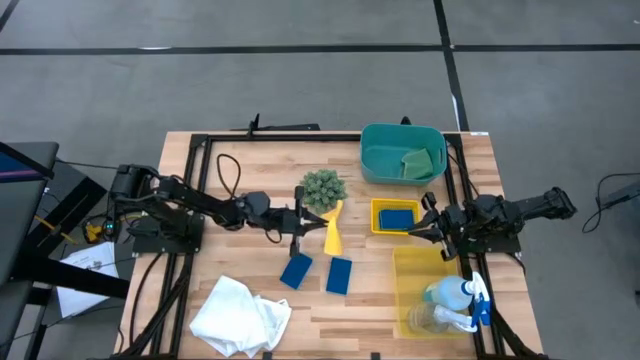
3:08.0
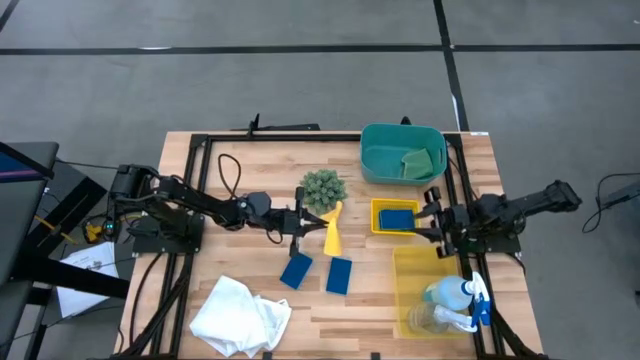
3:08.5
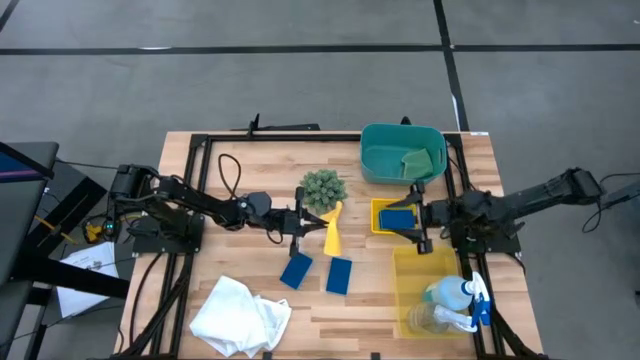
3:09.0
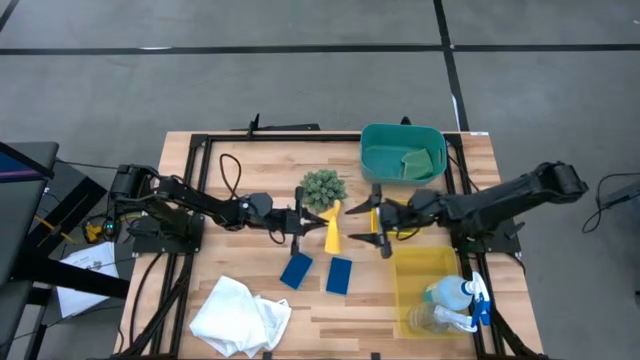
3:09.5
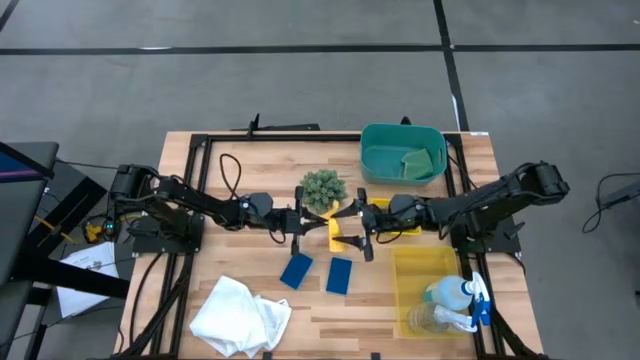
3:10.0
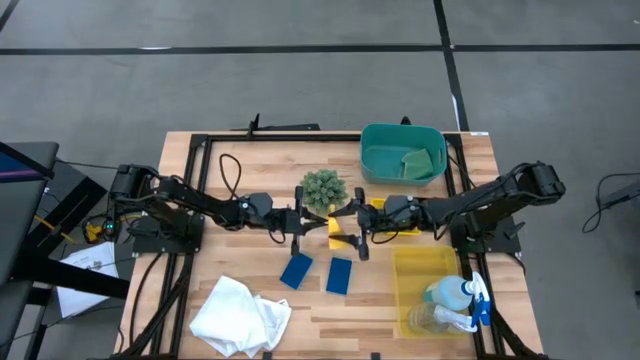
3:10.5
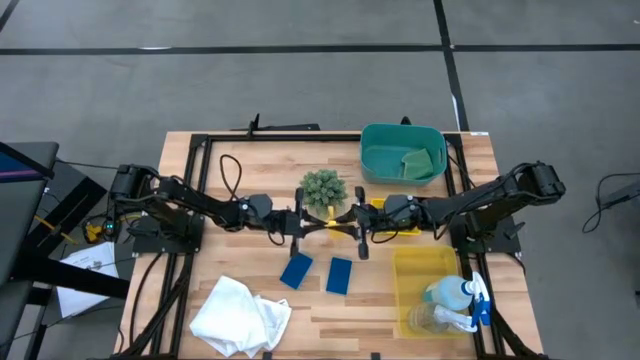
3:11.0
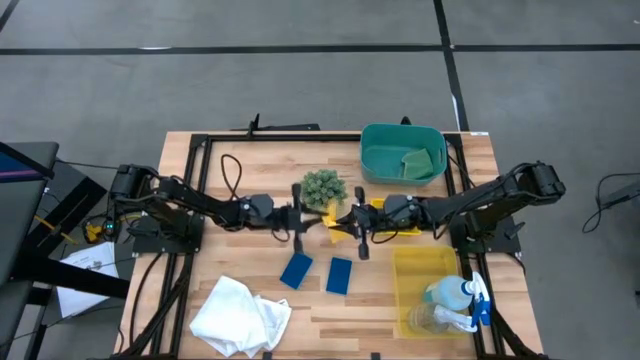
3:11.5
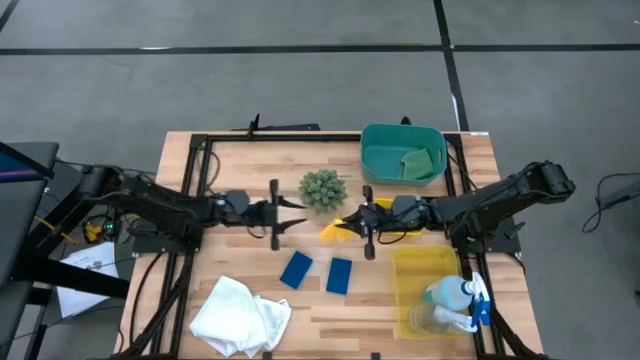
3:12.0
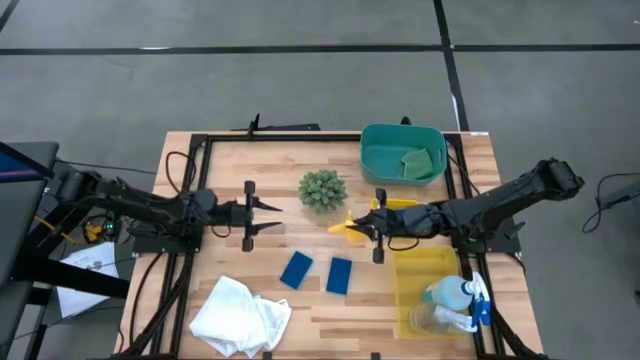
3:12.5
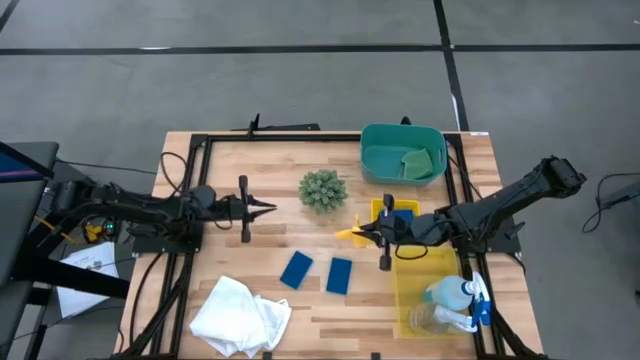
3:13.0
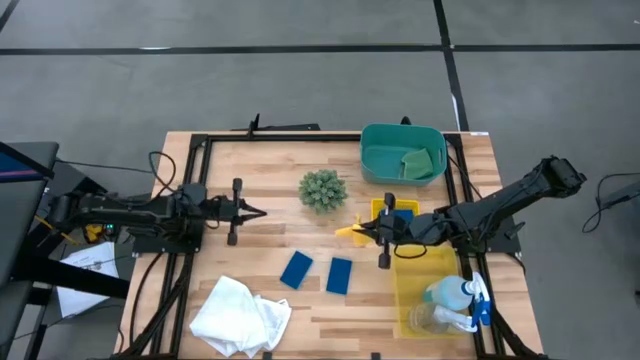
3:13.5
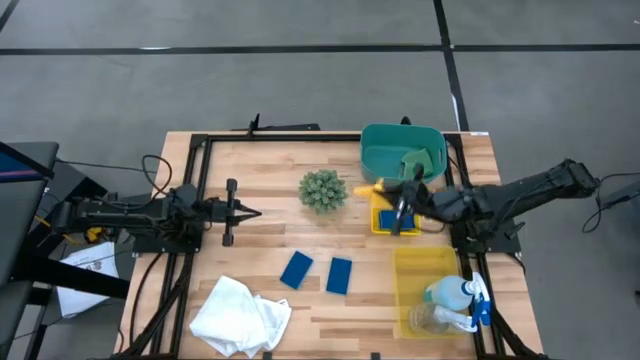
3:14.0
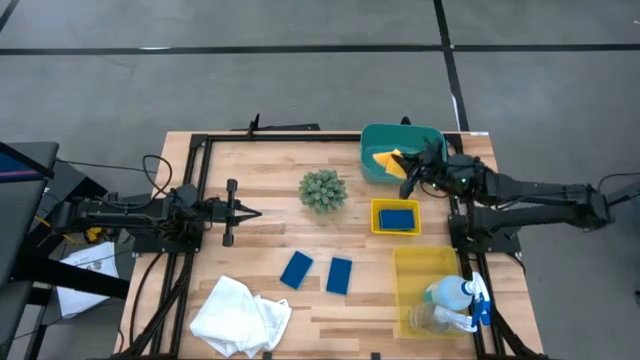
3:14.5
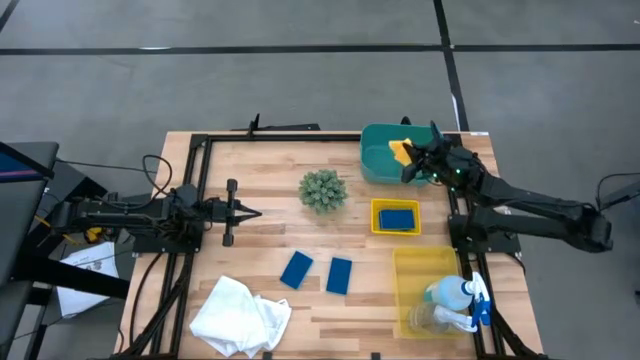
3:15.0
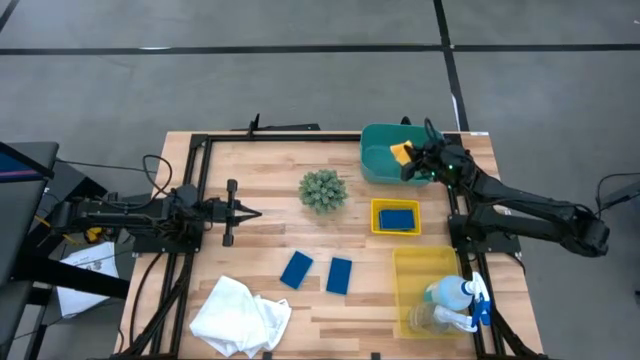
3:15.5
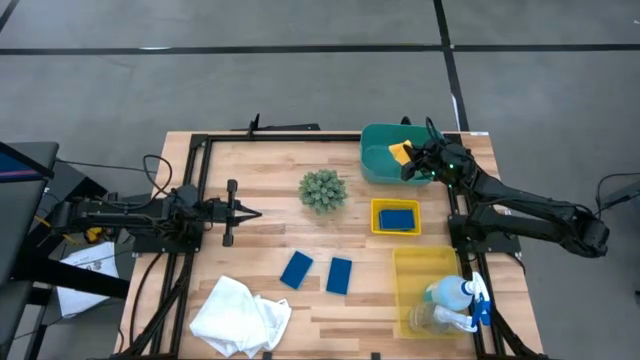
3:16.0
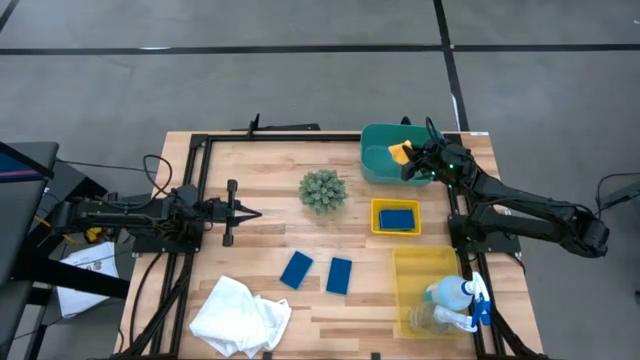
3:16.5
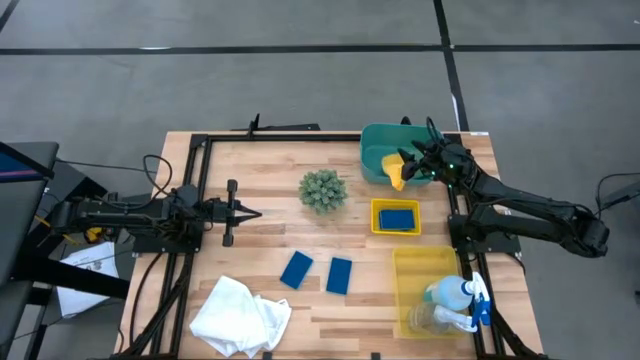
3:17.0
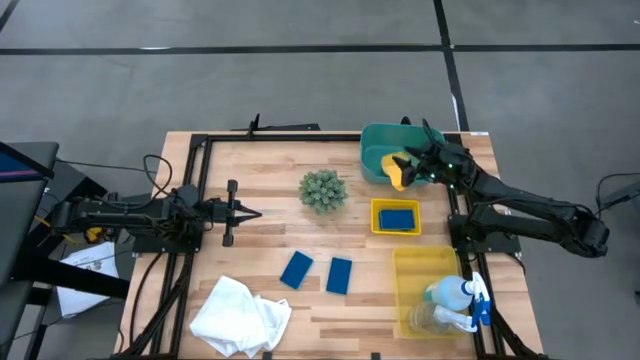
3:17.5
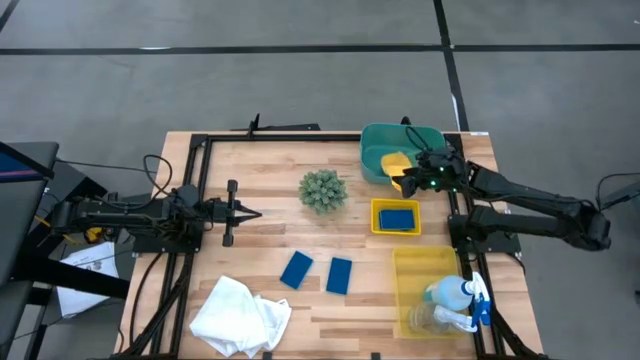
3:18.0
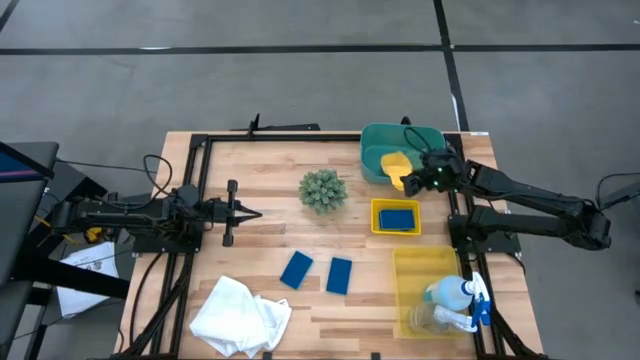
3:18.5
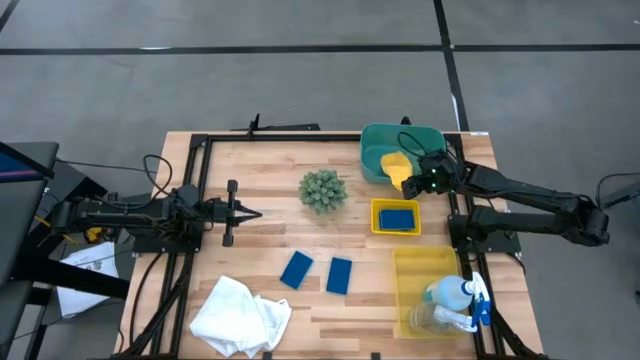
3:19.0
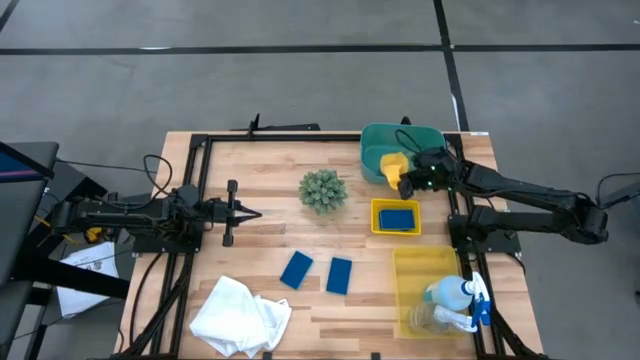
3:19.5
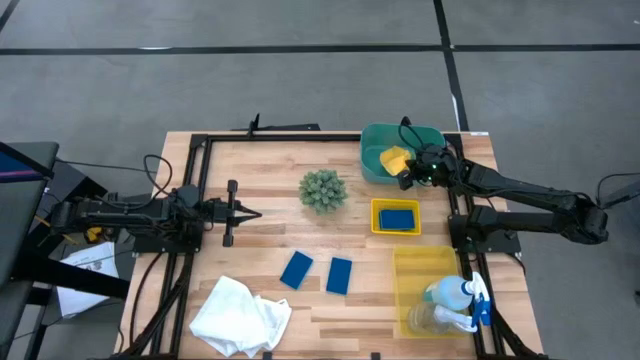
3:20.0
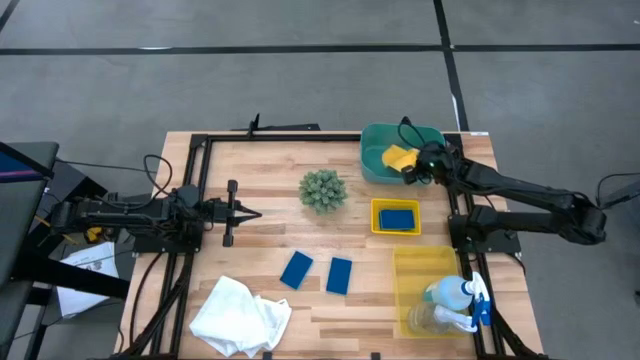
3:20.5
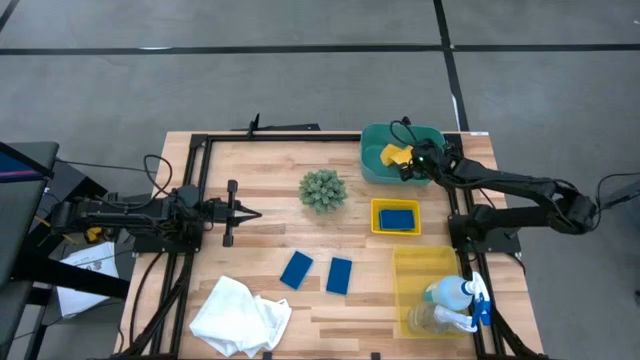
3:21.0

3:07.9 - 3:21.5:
Task: Pick & Place Kitchen Items
Put the yellow towel into the green bin

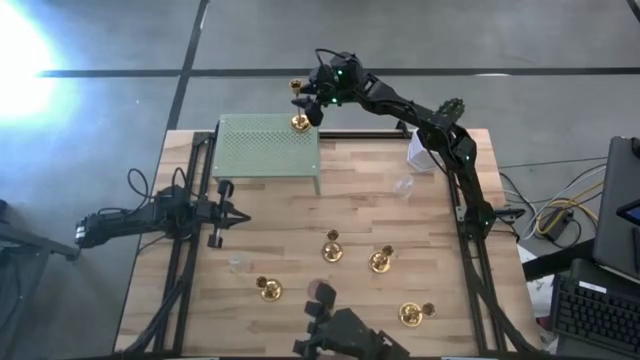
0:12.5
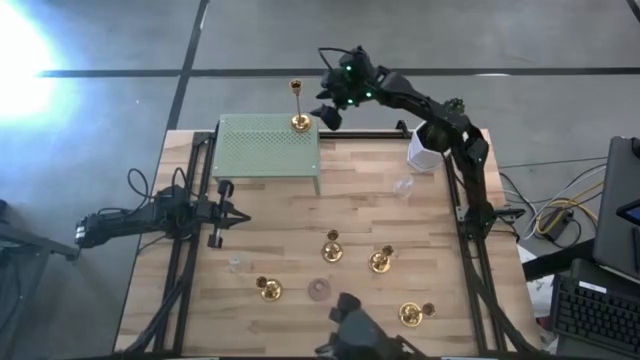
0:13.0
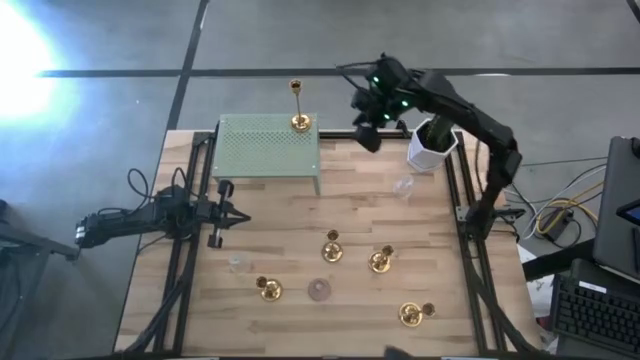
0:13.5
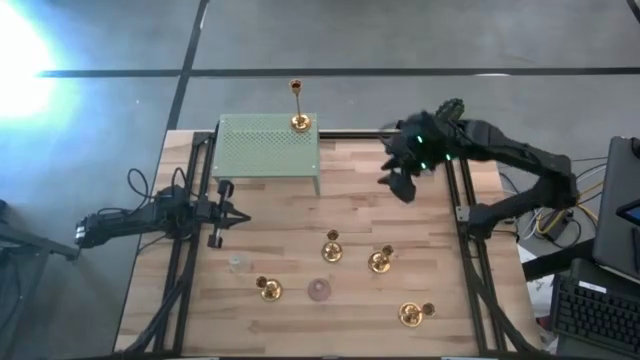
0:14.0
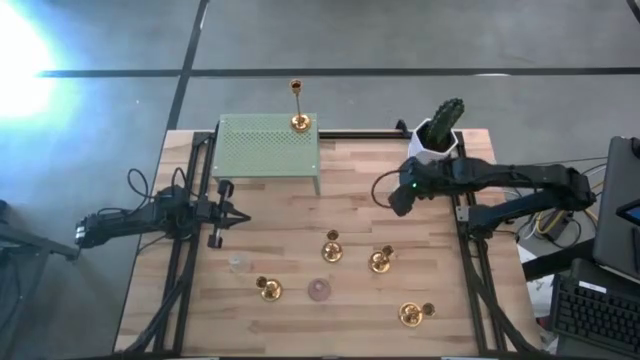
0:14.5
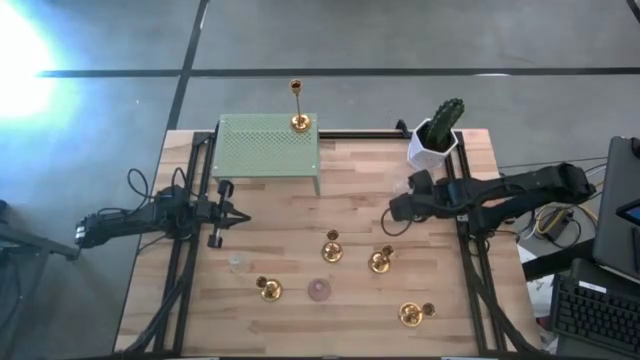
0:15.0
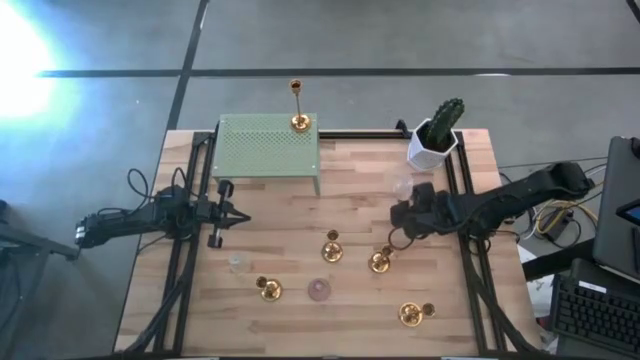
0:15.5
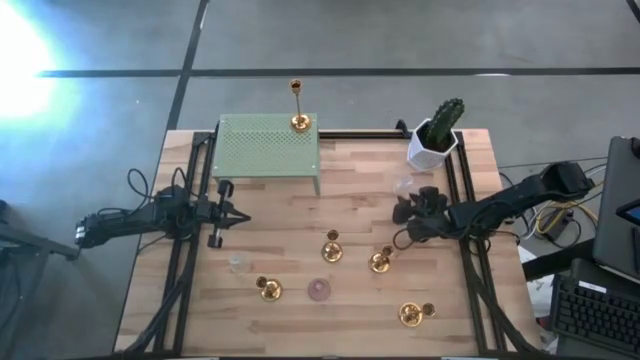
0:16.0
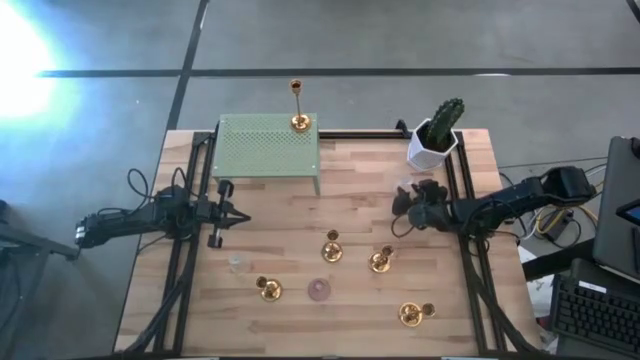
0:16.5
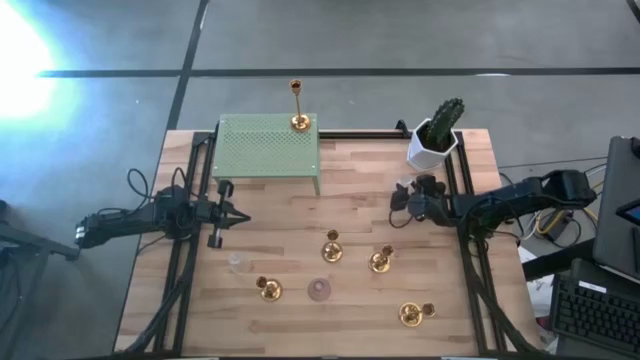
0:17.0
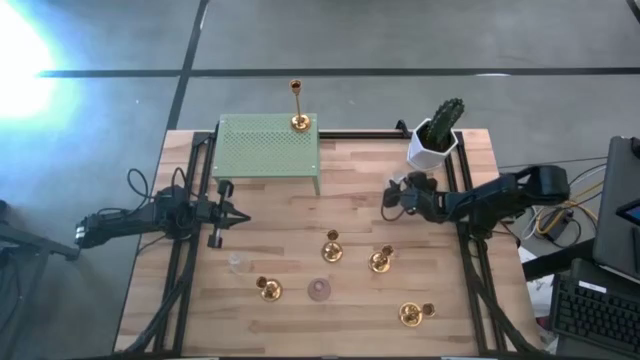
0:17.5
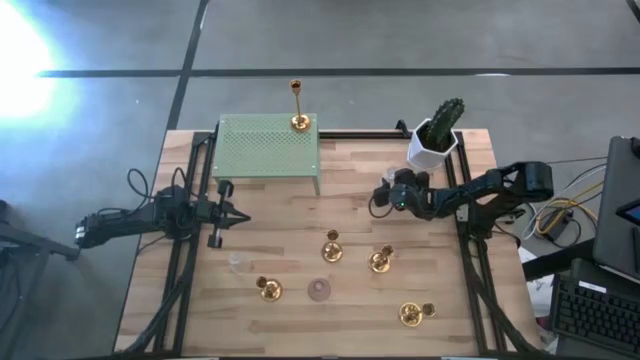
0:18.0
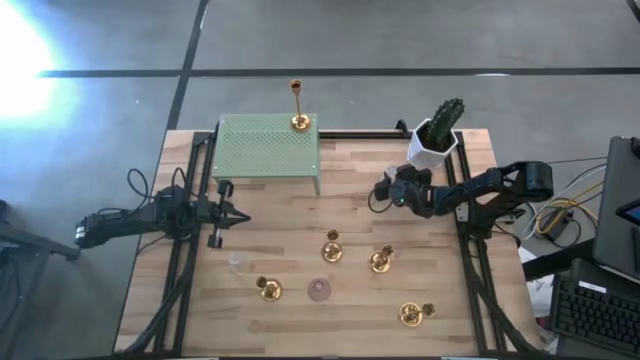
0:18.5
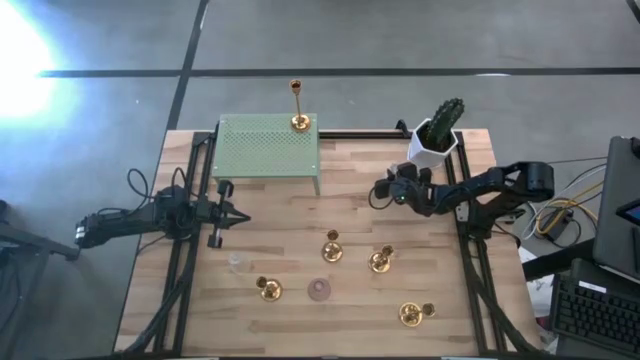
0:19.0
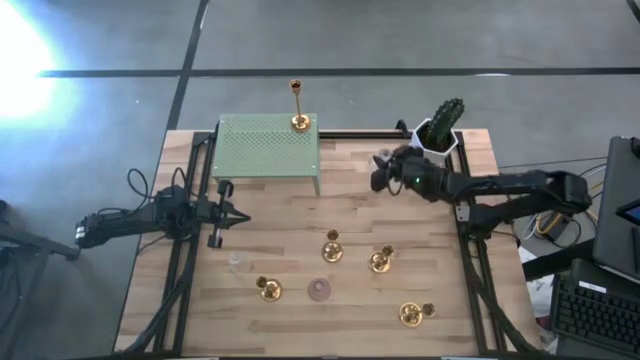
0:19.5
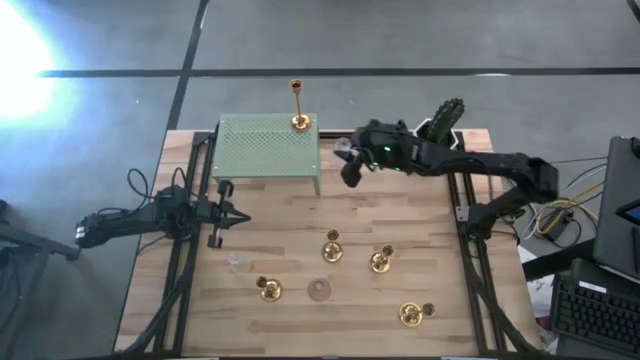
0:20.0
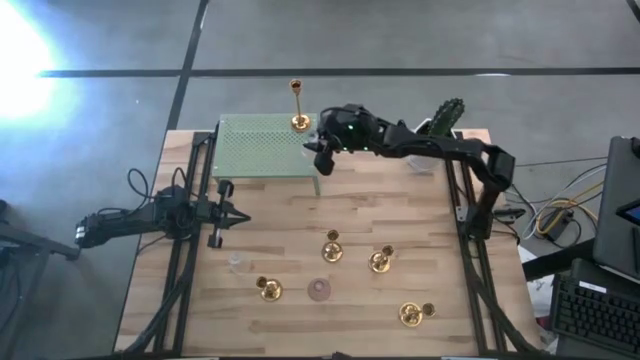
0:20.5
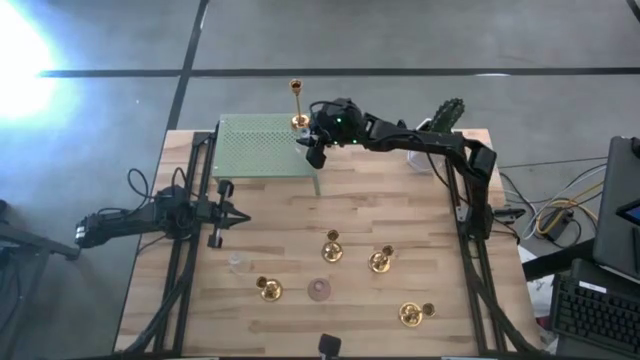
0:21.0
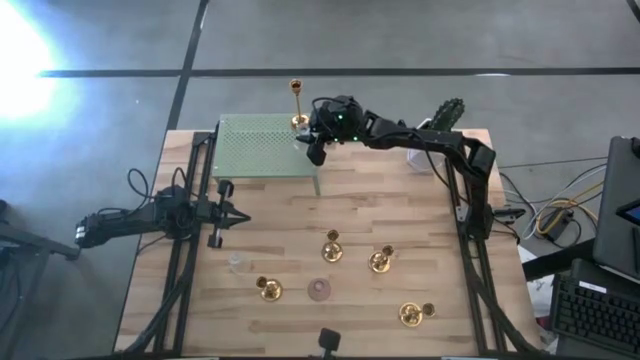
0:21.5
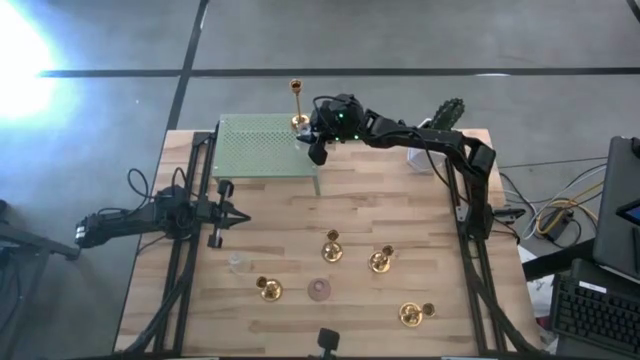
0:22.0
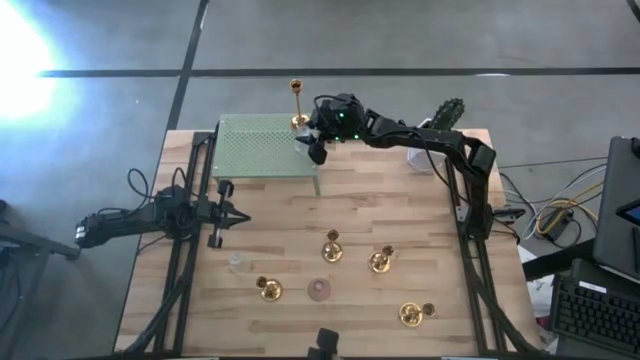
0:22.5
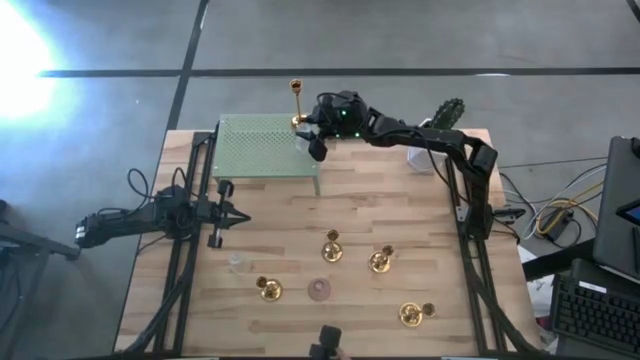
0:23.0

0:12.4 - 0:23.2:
Task: Pick & Place candle stick holders
Put the right transparent candle holder on the shelf
